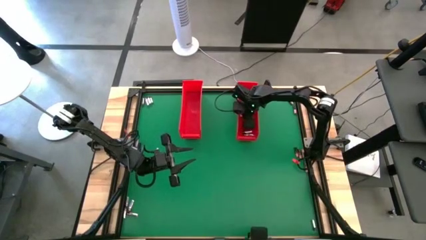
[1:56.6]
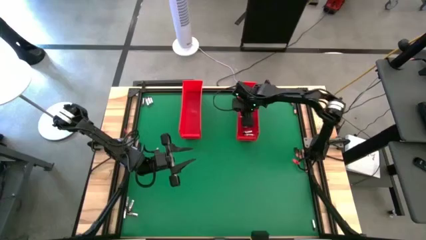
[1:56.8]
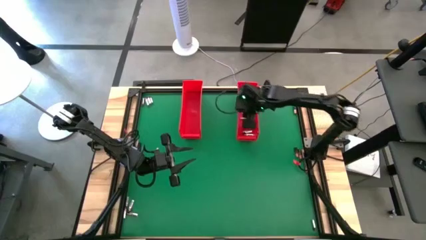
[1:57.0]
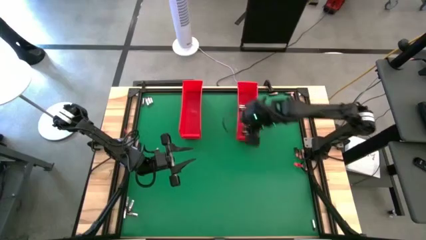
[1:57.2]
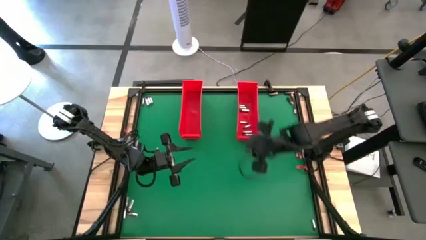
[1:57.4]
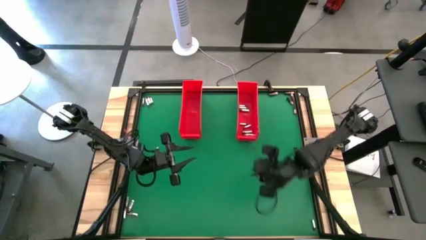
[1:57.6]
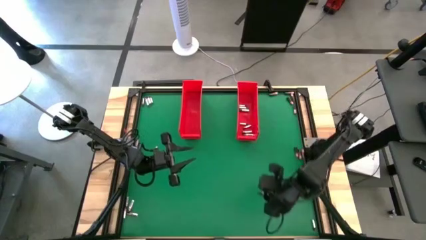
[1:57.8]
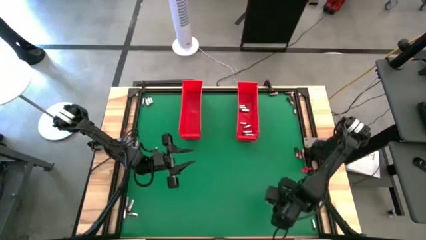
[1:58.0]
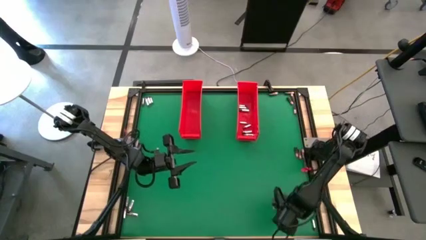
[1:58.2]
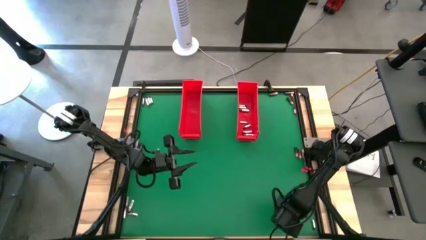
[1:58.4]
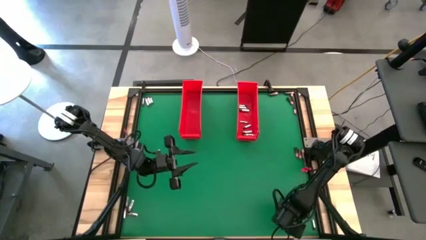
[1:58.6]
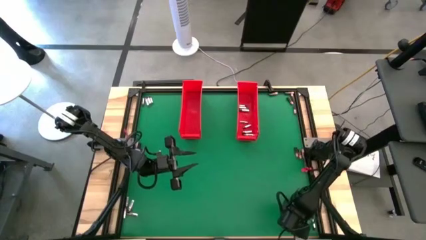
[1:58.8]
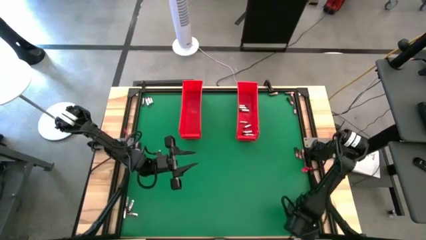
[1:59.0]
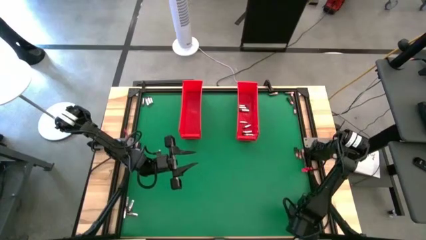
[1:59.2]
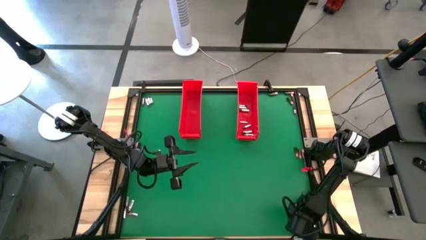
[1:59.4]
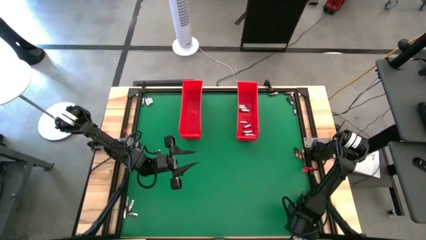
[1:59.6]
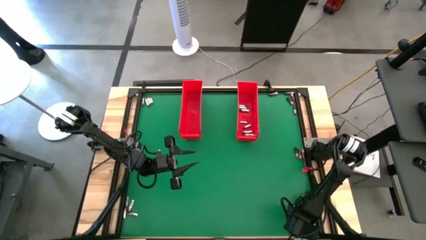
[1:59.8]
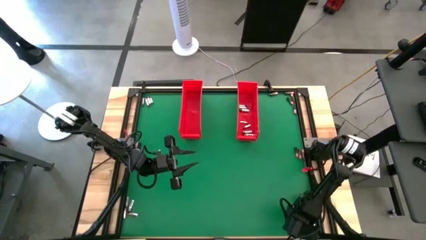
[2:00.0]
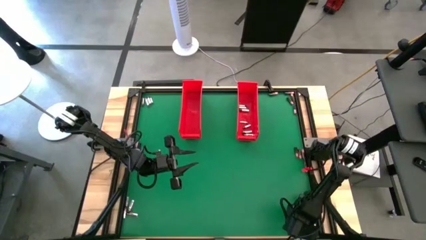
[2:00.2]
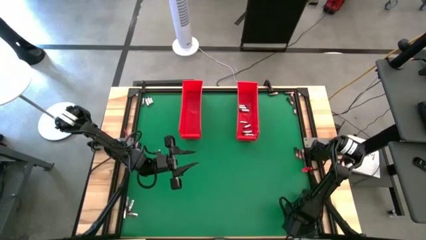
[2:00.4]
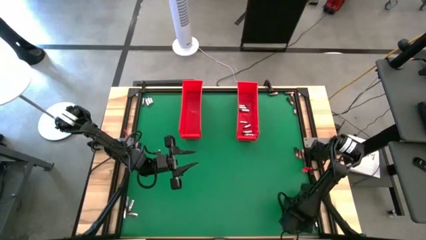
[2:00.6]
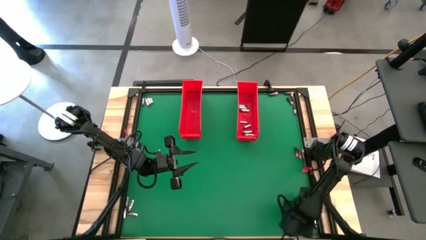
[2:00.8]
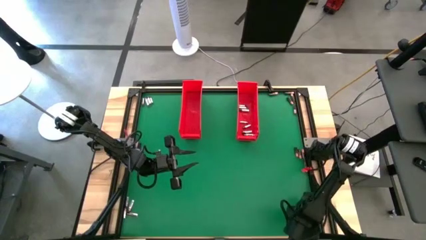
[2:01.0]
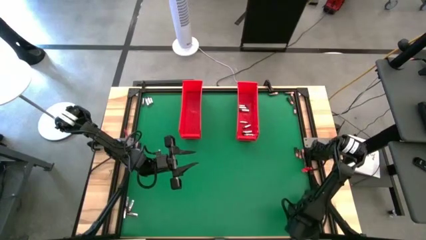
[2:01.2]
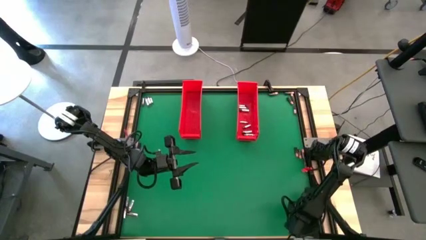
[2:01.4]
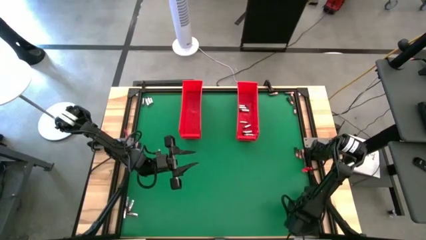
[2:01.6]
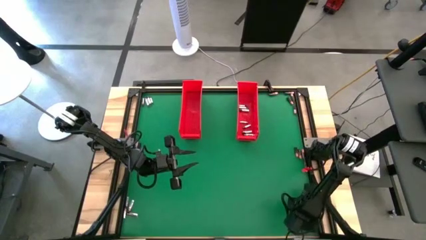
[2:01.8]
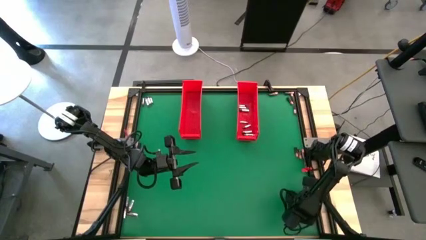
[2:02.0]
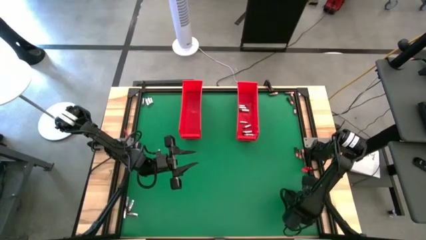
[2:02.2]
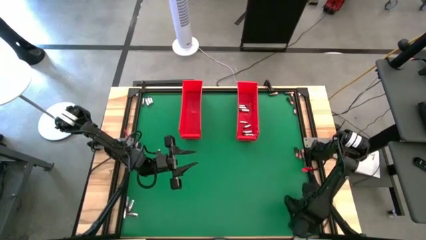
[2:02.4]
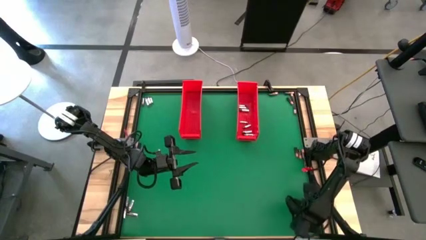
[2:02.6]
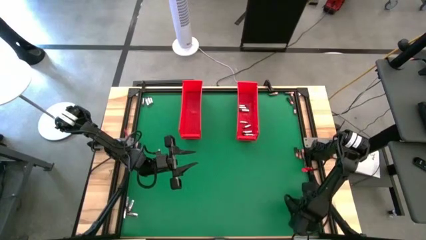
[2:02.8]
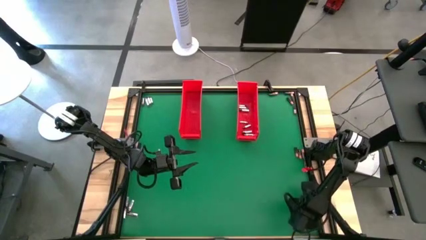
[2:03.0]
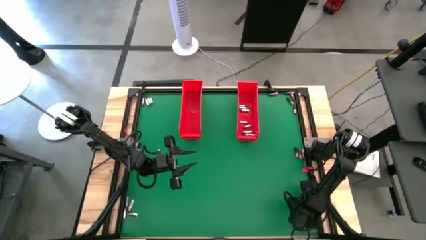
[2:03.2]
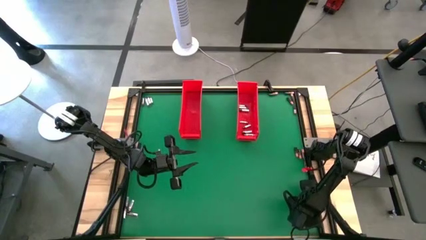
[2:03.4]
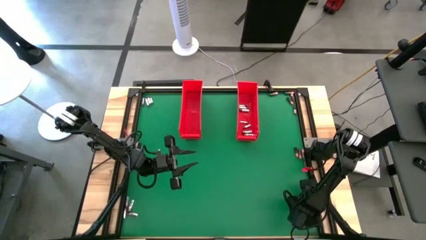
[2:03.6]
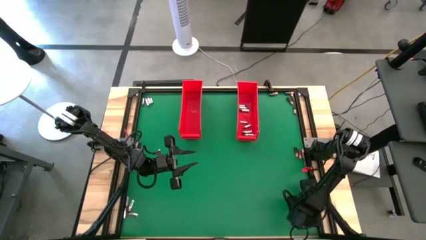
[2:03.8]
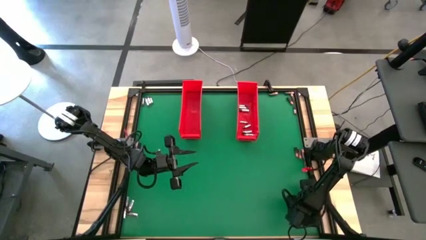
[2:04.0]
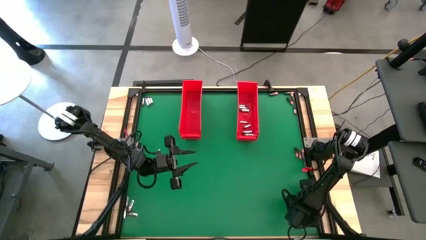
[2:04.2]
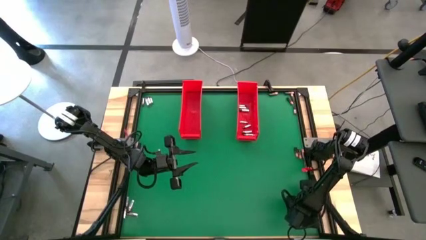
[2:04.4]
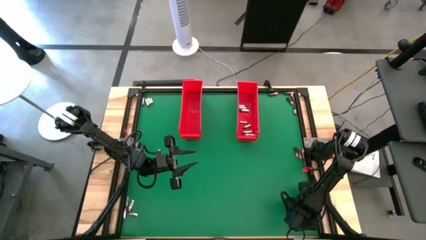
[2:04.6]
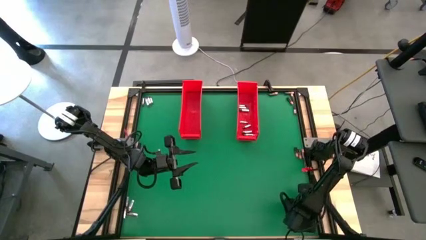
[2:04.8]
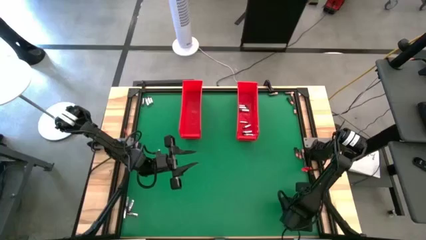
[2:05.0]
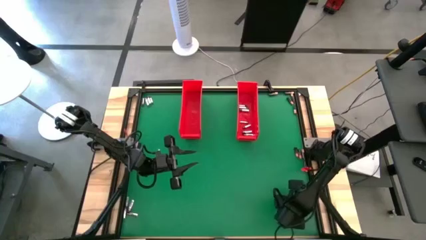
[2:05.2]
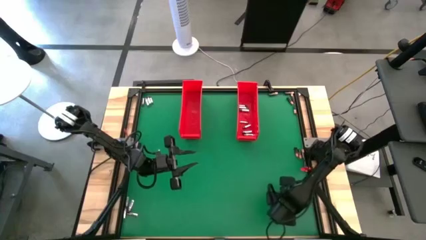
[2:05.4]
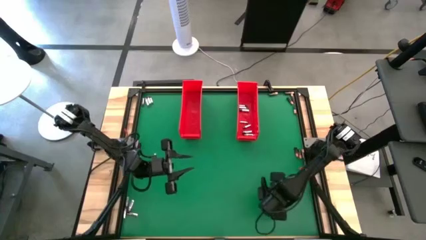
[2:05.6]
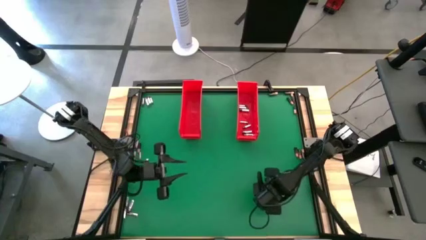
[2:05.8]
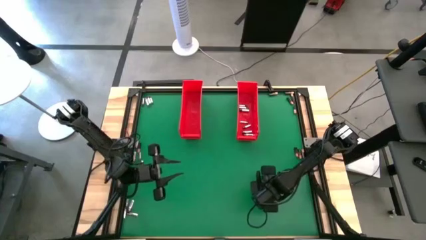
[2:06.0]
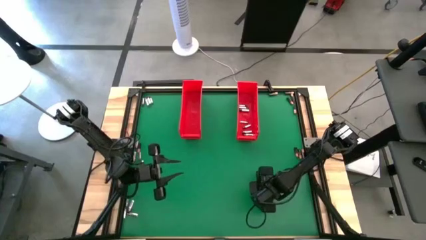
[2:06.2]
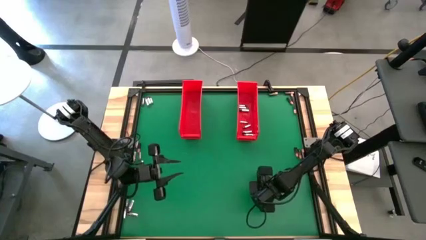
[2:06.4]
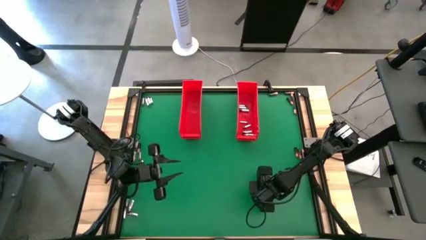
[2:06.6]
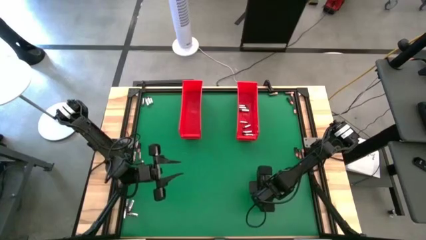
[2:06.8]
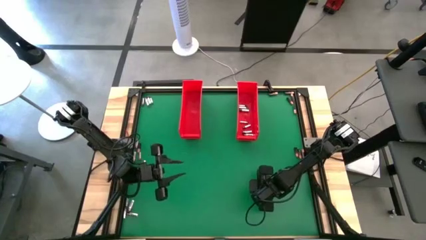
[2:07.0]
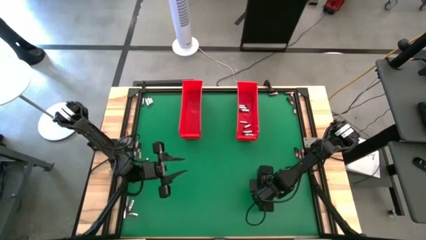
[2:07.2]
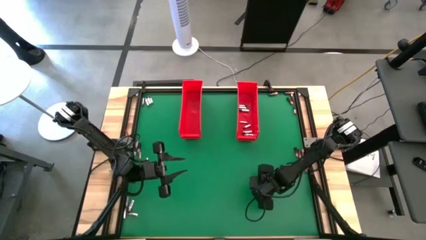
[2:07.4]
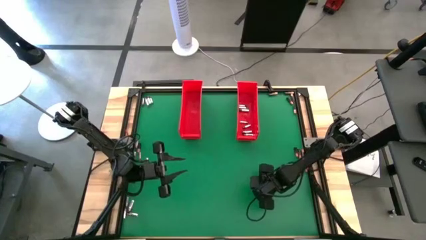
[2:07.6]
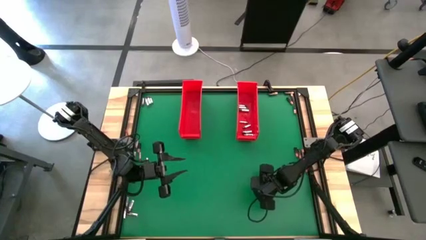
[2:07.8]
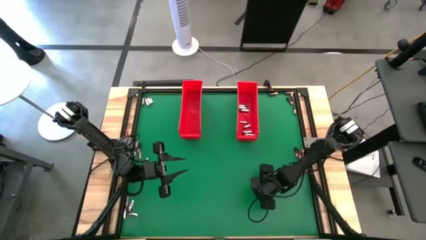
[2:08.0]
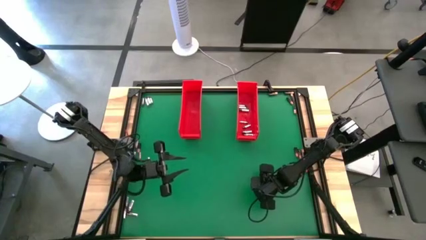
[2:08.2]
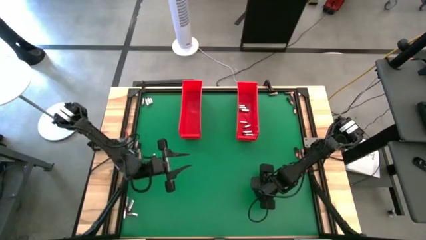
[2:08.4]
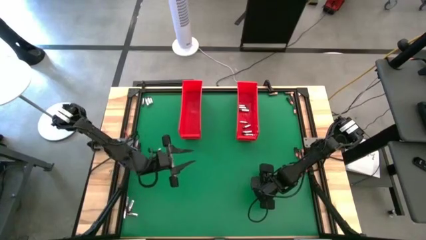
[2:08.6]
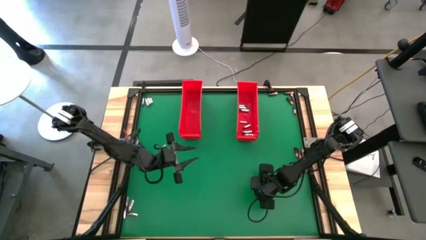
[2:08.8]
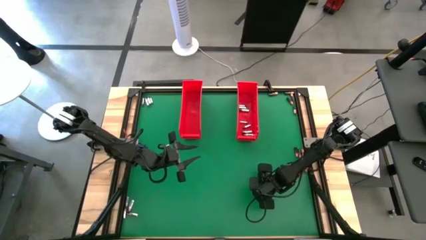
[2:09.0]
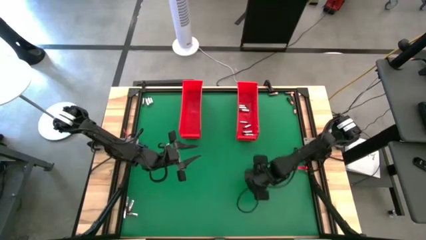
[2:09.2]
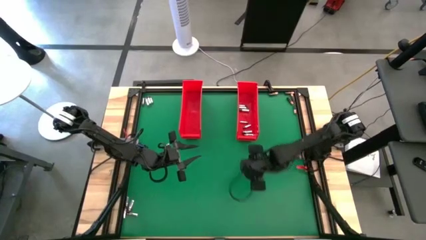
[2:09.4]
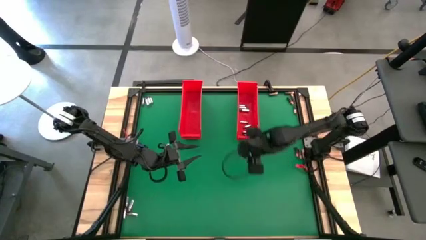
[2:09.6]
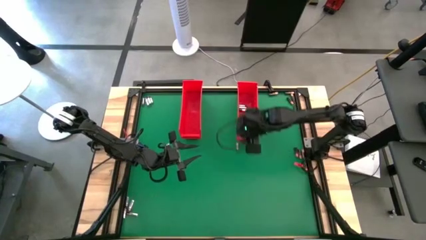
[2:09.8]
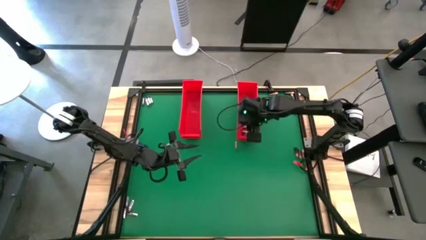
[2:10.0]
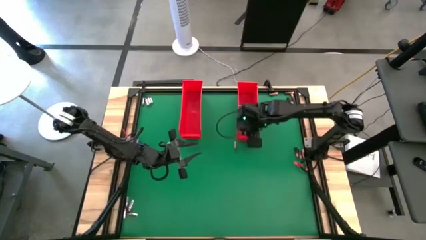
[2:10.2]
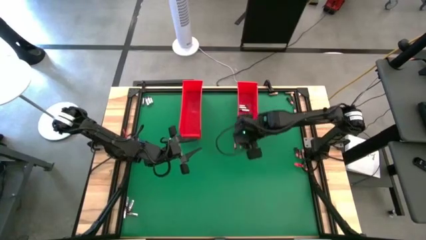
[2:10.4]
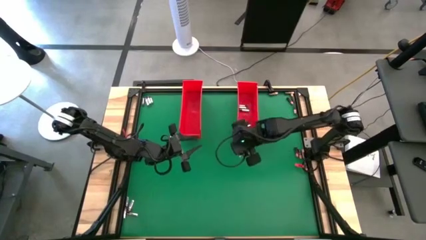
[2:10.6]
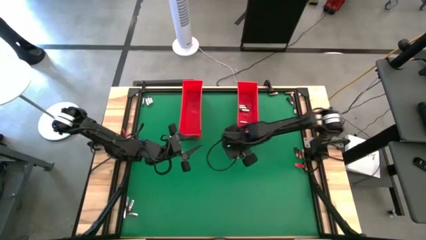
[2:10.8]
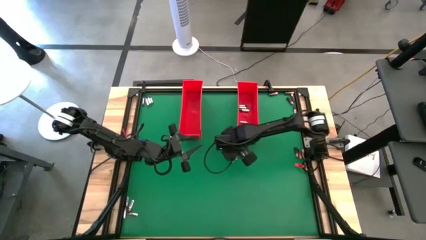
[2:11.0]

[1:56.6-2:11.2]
Task: Sort batteries
Put the silver battery into the right red bin

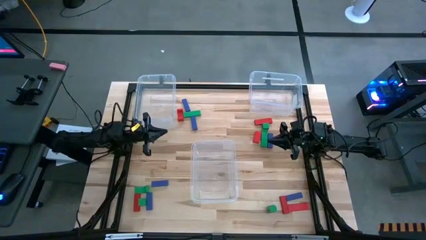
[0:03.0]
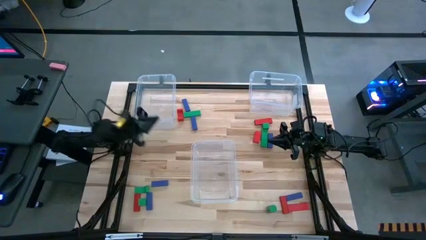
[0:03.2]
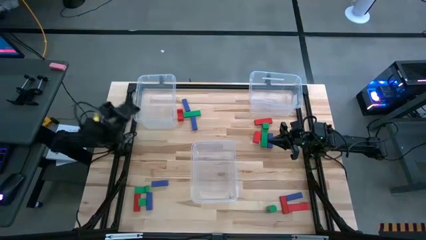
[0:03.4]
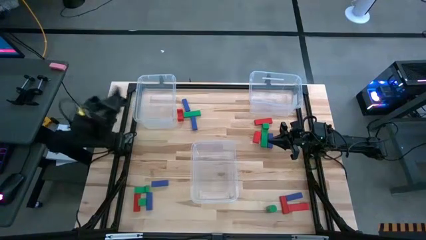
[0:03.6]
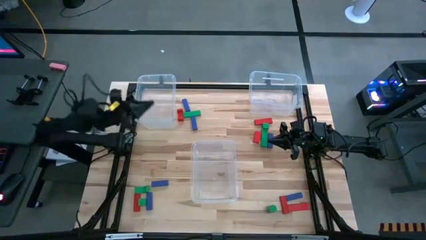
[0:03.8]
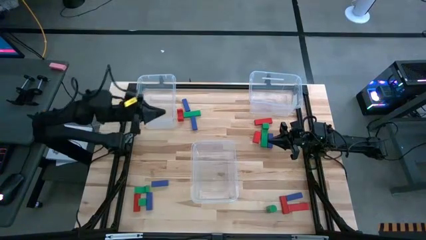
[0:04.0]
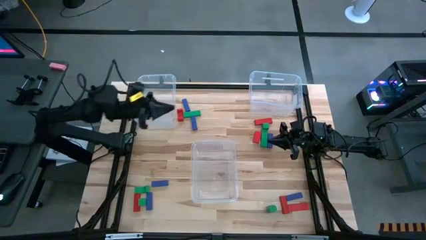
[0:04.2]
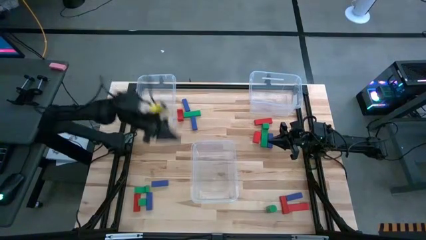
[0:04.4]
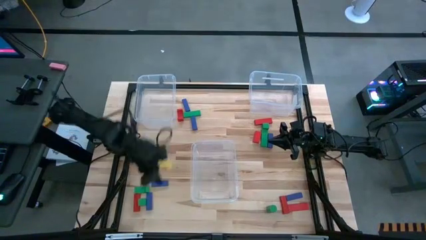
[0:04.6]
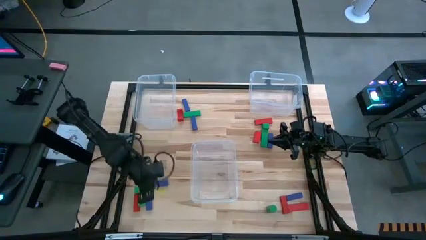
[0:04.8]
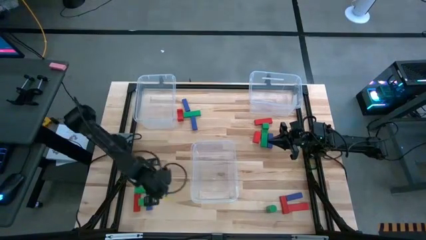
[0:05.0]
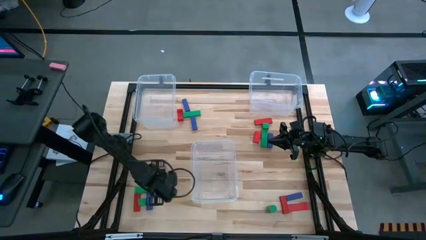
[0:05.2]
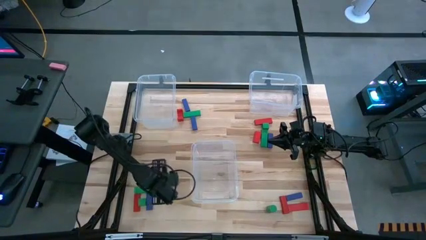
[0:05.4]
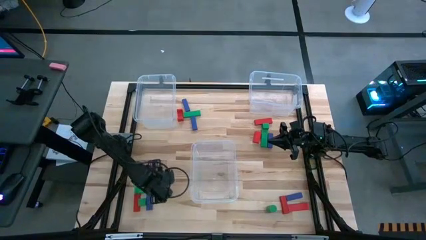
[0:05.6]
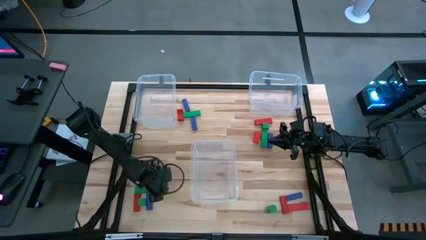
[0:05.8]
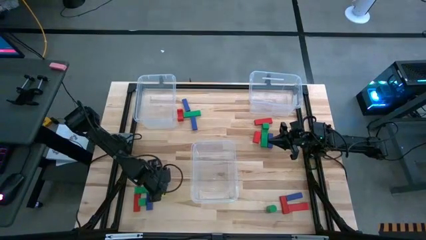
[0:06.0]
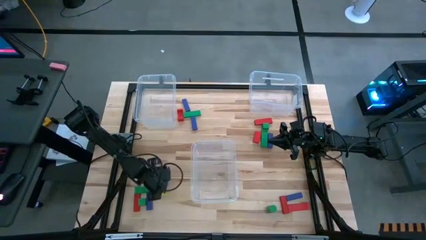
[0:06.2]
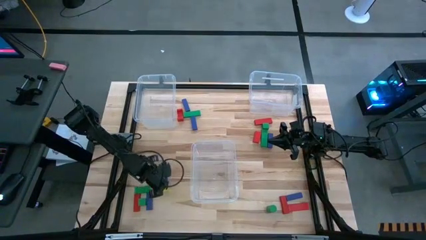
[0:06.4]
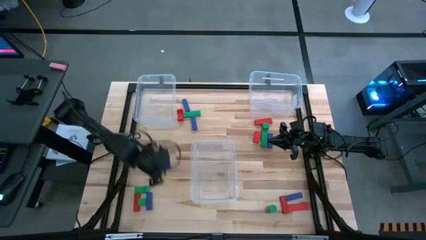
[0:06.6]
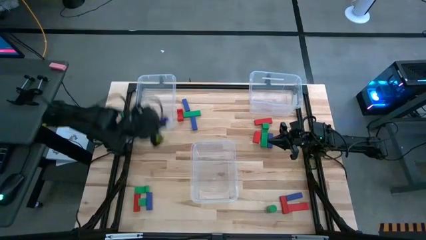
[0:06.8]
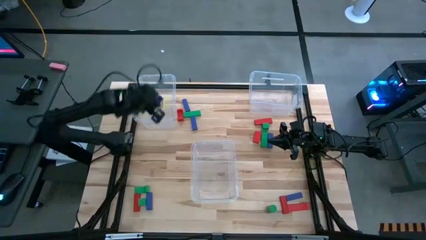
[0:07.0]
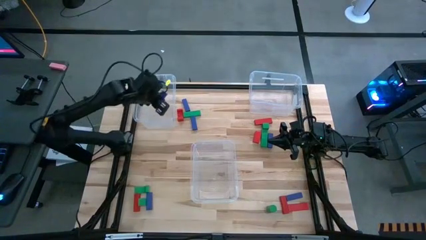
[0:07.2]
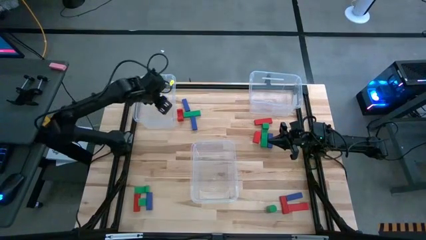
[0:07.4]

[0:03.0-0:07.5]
Task: Sort blocks
Put the blue block into the top left transparent bin
